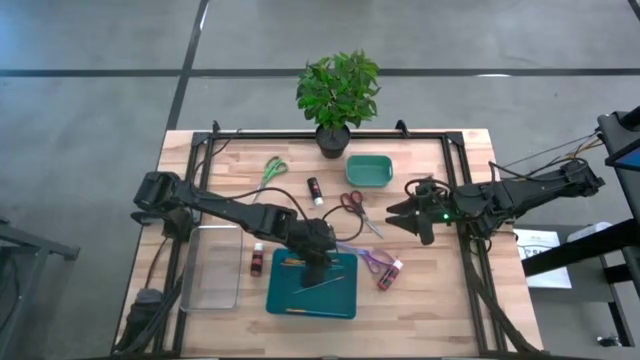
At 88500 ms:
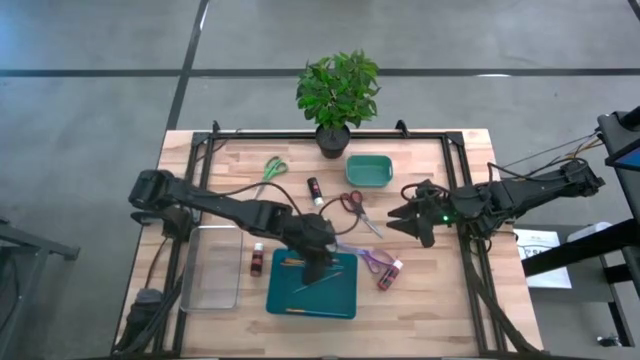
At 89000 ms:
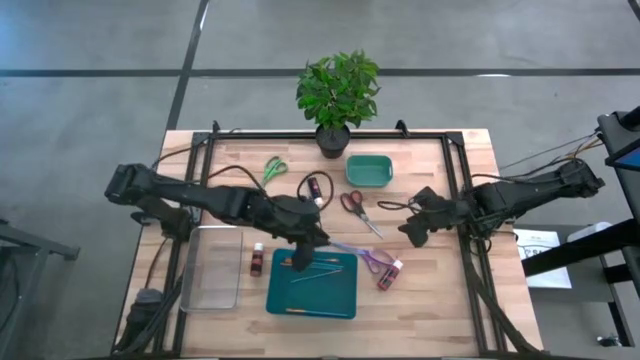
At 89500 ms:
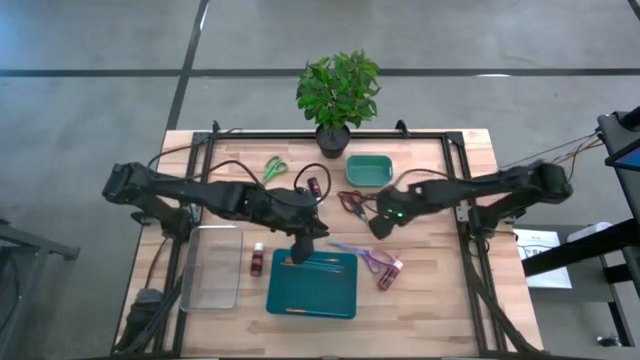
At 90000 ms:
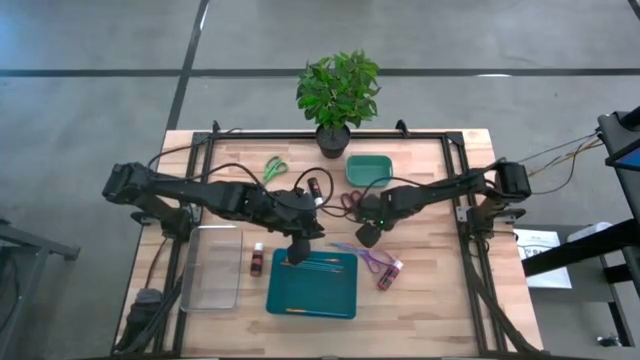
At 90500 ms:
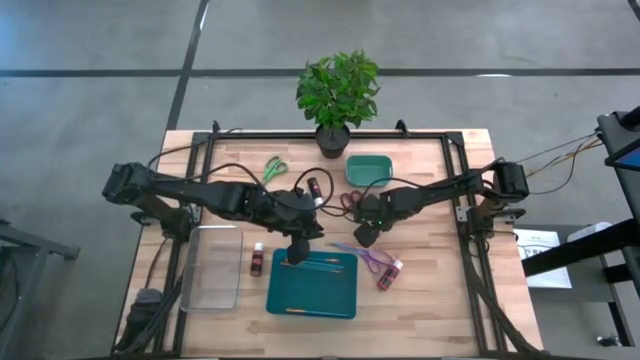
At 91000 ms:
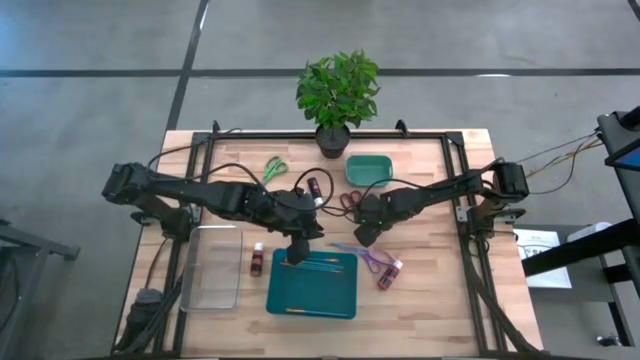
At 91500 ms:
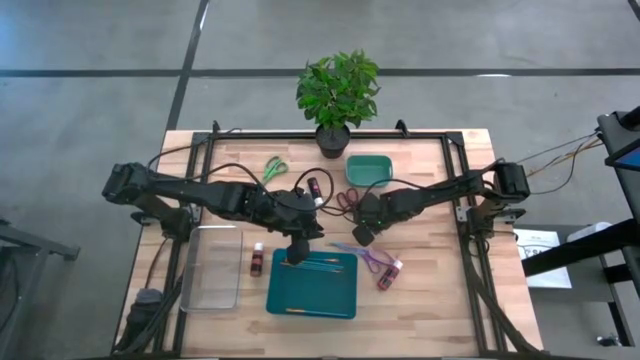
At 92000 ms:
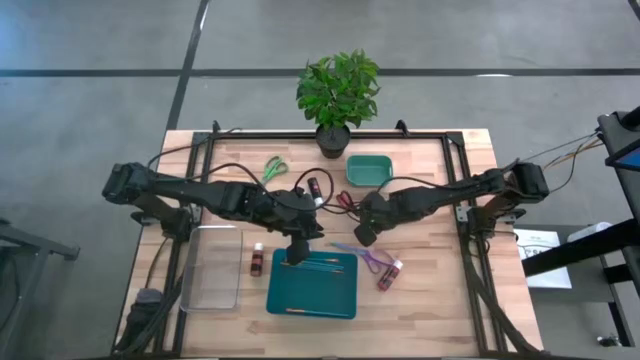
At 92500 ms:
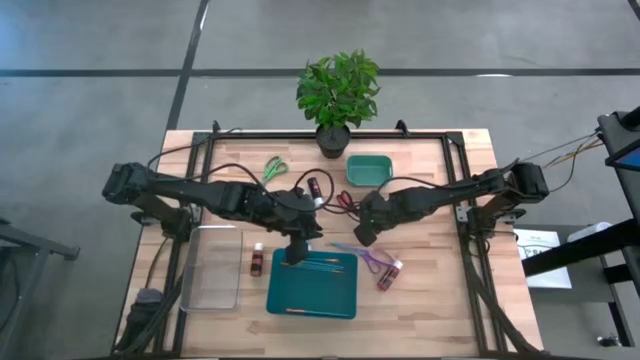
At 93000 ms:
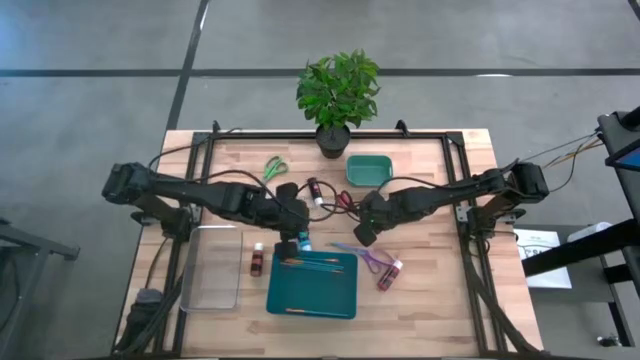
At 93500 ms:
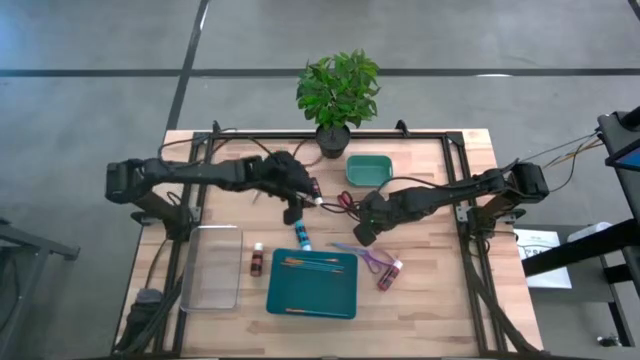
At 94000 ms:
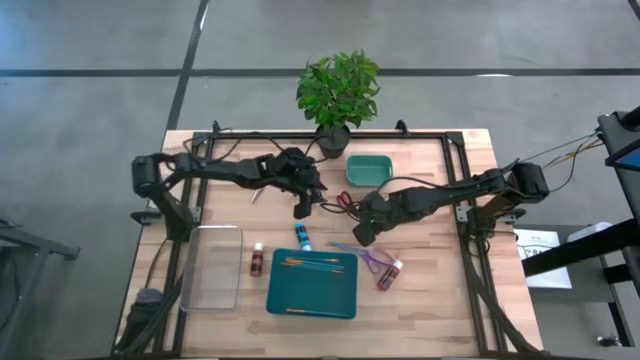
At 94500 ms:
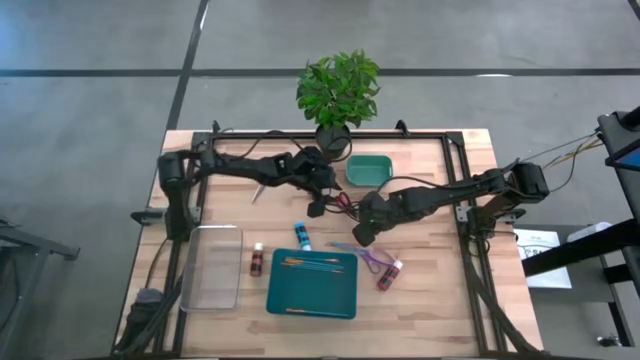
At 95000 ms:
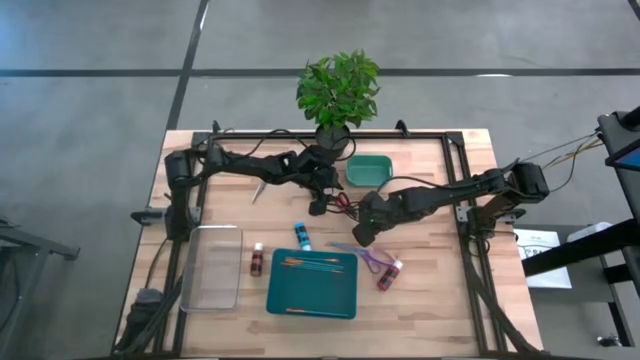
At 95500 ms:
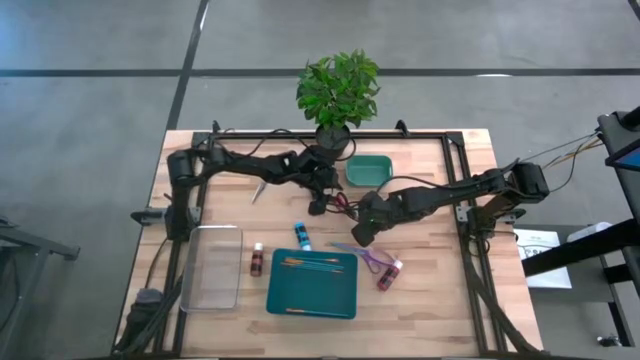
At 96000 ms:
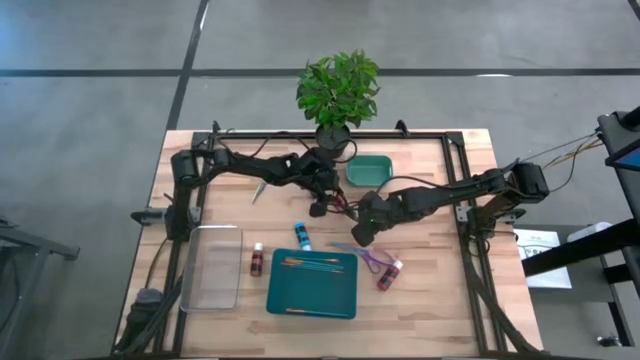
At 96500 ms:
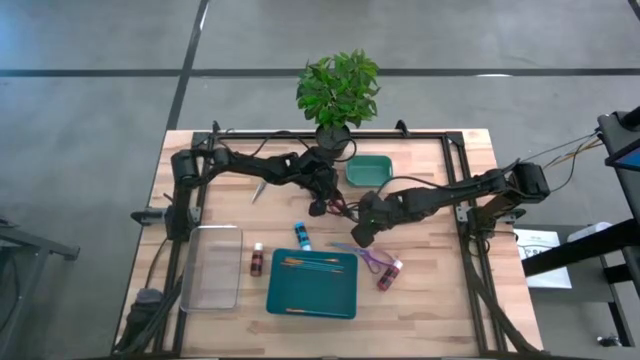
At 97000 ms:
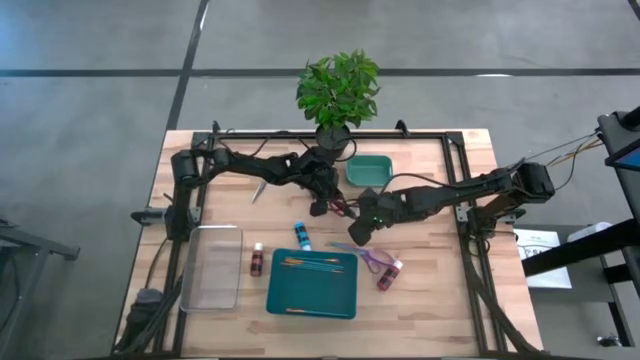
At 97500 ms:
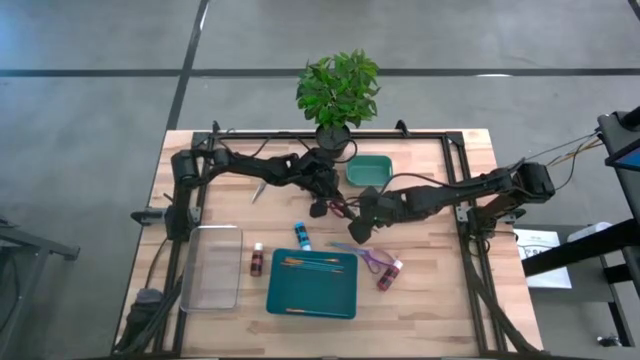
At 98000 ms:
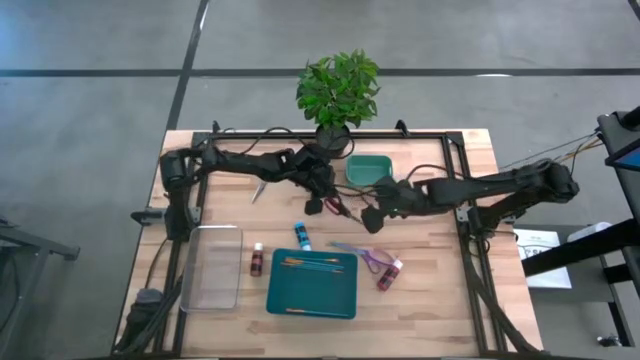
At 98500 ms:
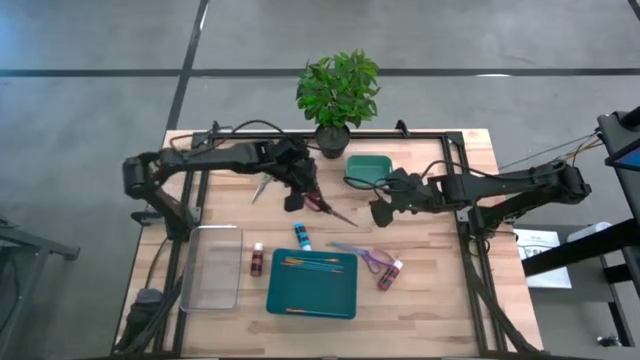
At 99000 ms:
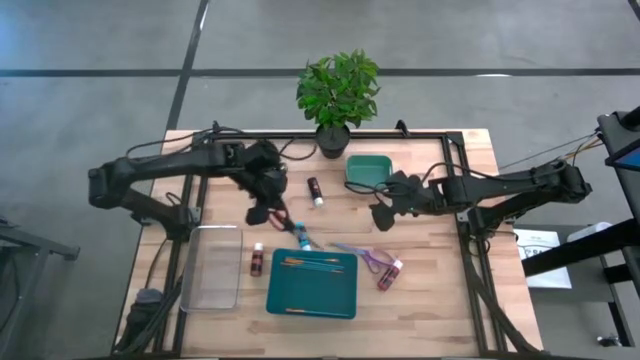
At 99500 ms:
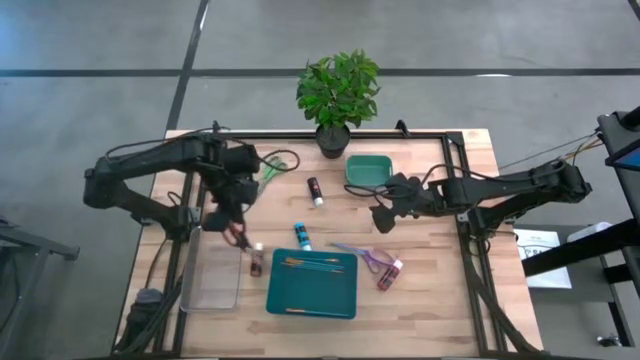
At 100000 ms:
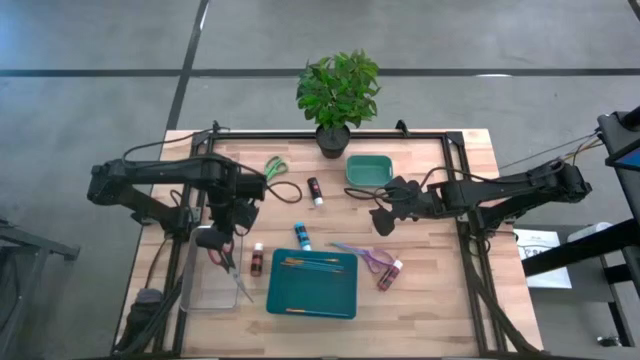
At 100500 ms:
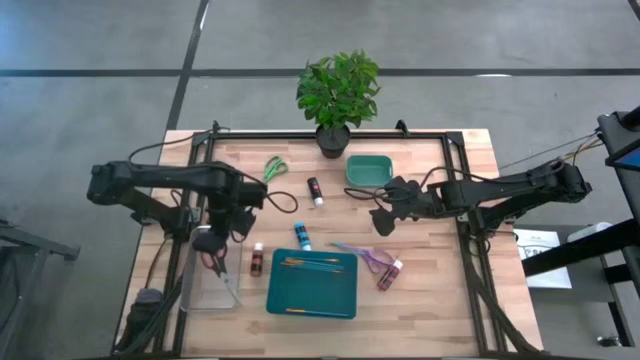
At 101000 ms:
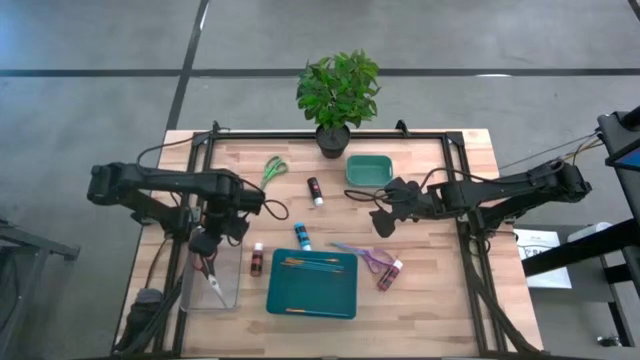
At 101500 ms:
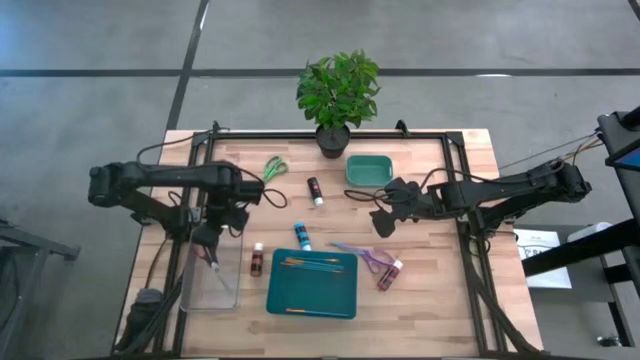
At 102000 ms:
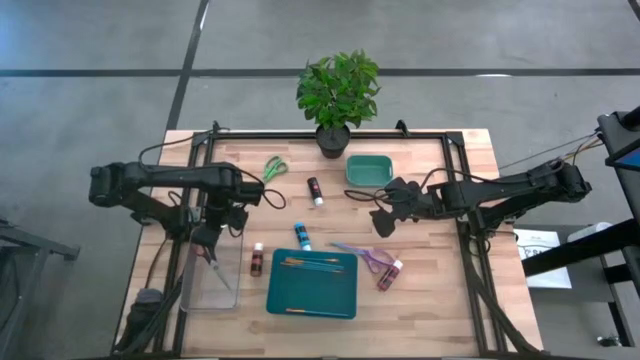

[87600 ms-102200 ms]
Task: Pick & Place Paint Supplies
Put the black scissors into the transparent bin

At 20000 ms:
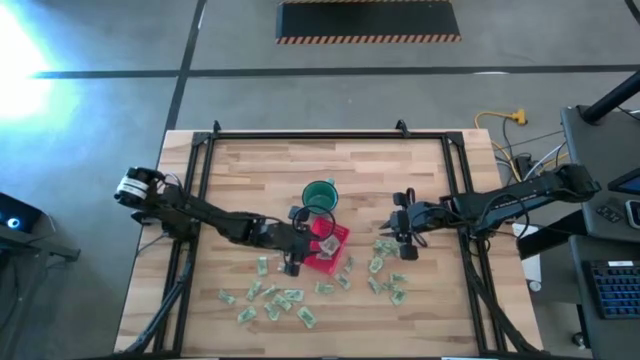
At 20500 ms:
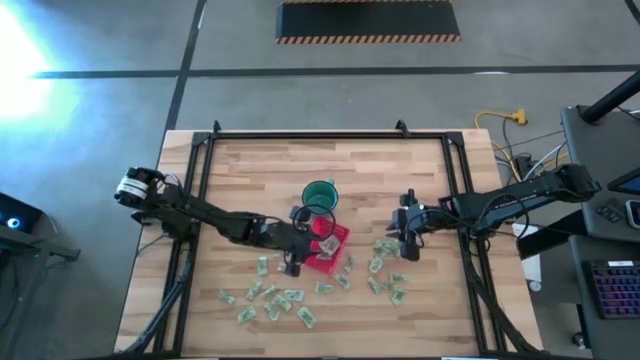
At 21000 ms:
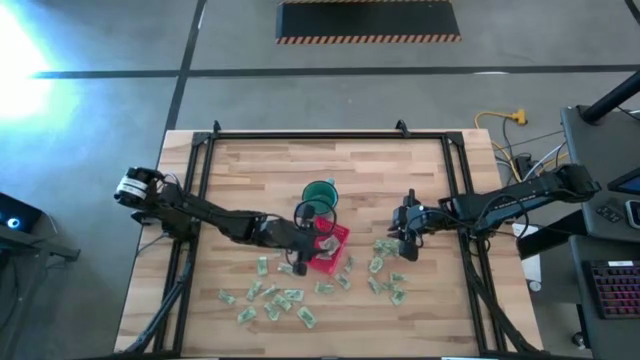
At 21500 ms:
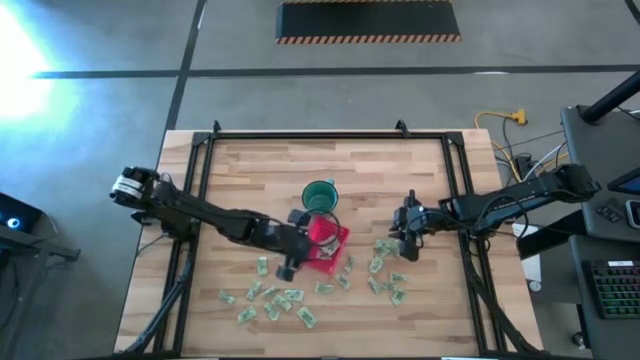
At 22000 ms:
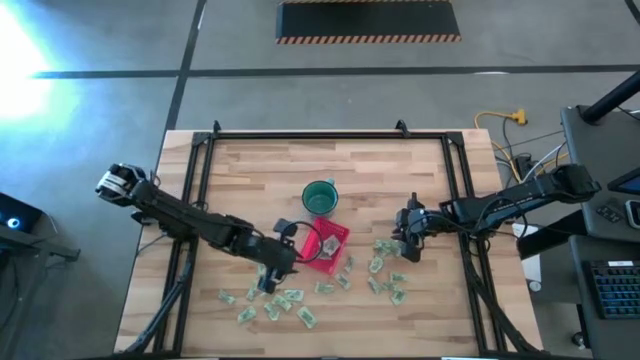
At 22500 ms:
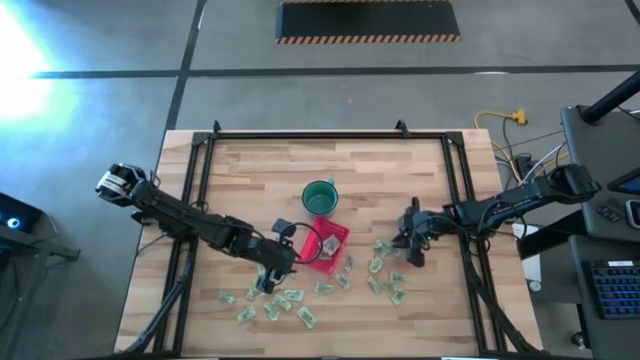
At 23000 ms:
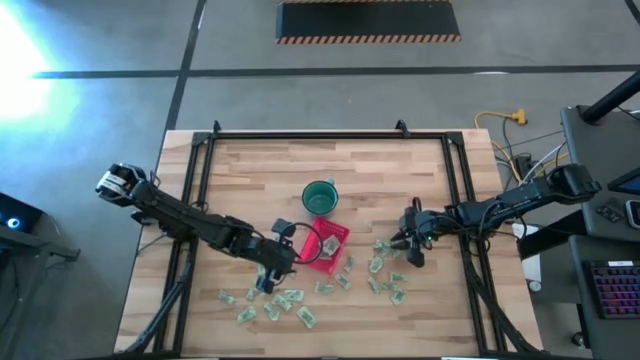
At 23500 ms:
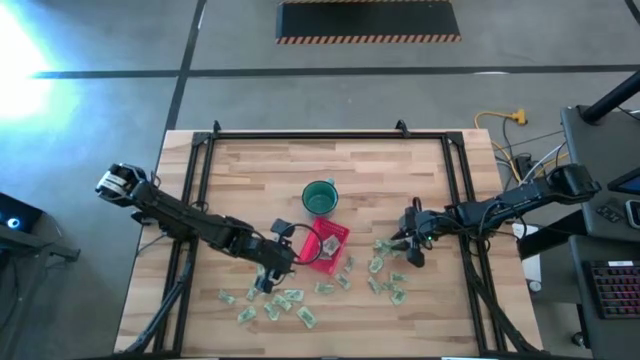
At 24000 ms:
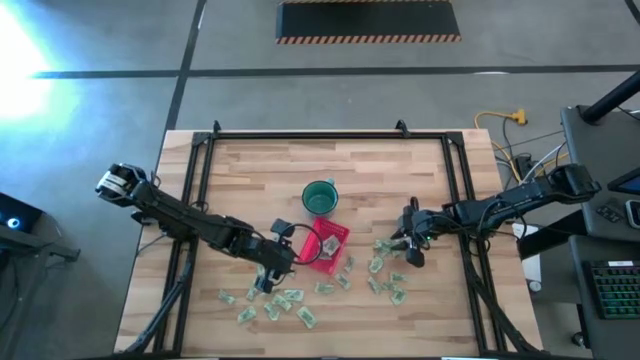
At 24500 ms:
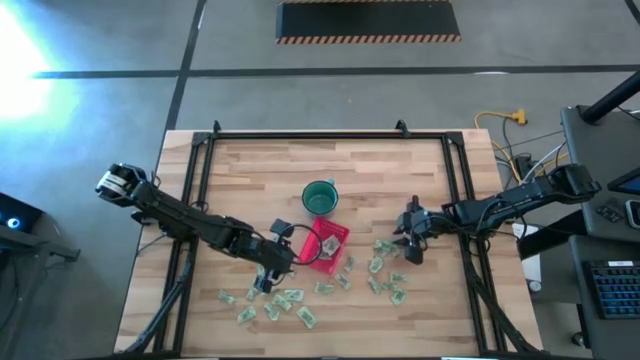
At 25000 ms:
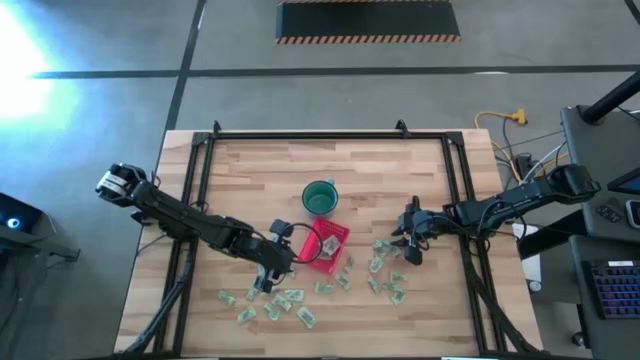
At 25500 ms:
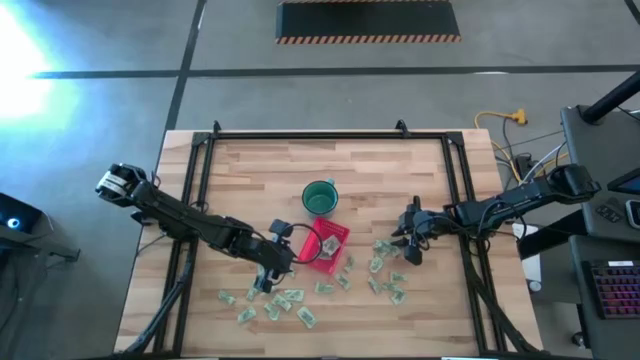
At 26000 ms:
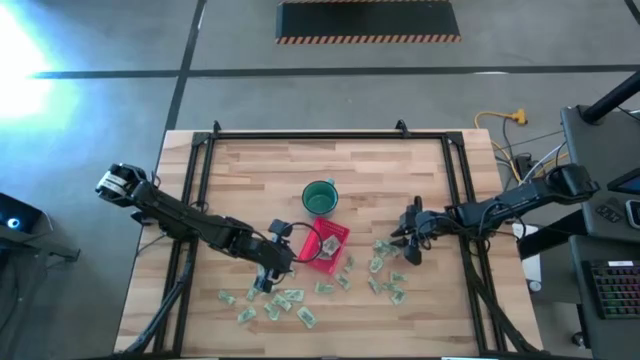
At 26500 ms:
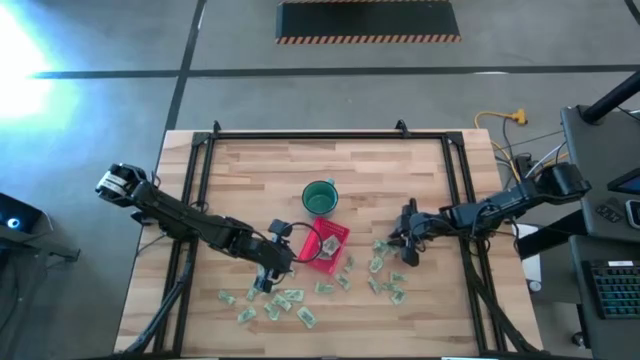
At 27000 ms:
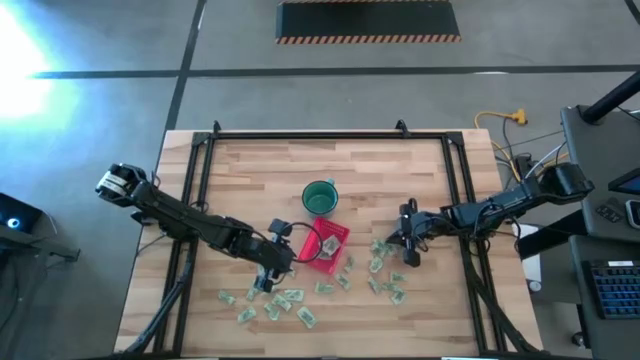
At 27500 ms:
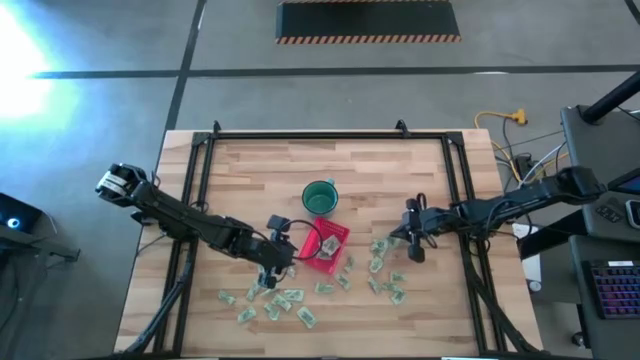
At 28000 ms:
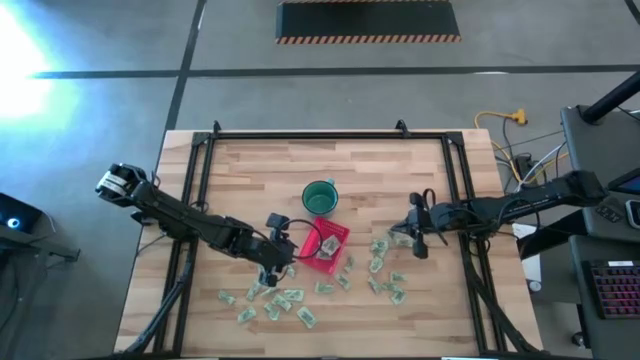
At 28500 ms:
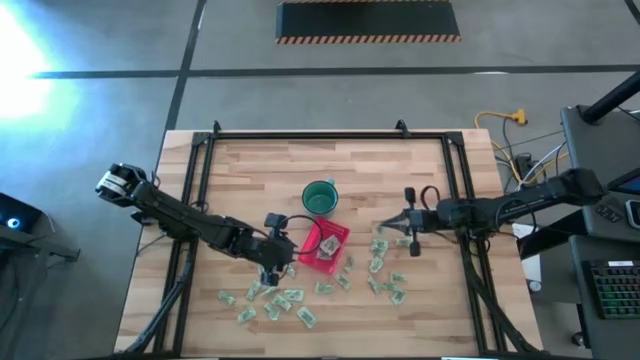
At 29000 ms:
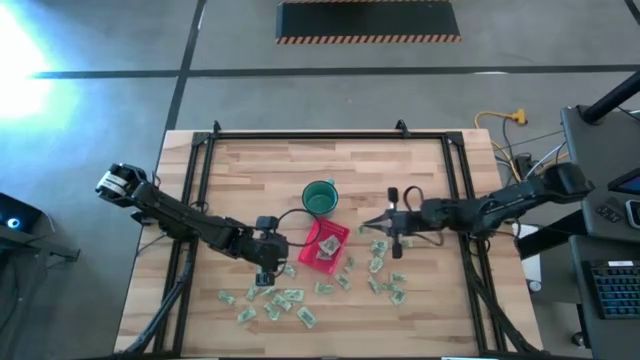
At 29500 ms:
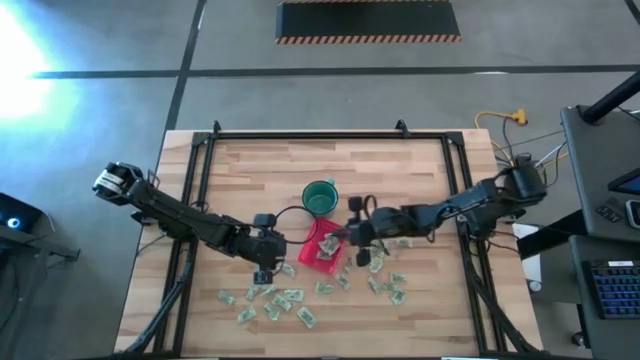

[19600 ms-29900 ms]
Task: Pick and place items into bin
Put the light green stevia packet into the red bin
